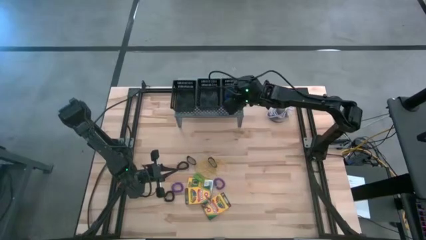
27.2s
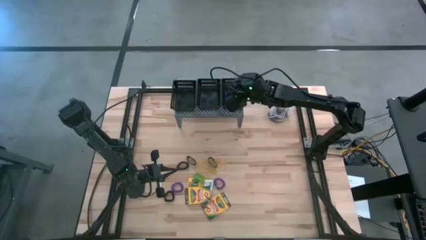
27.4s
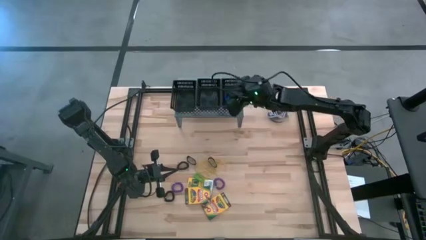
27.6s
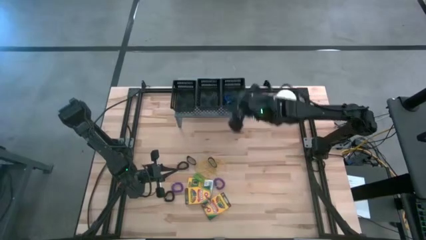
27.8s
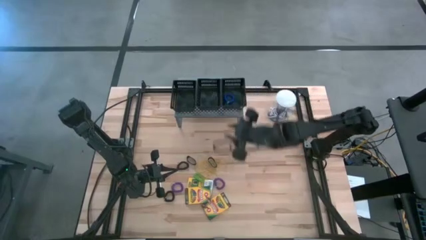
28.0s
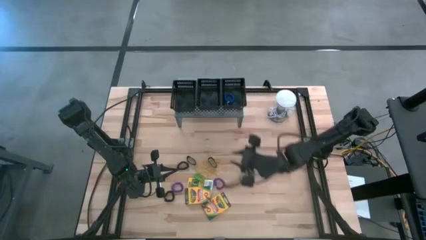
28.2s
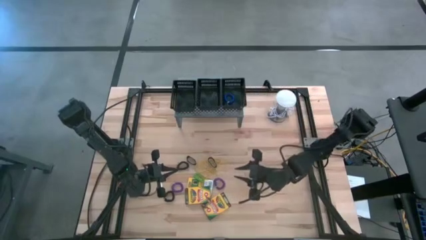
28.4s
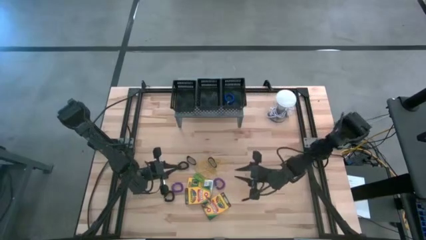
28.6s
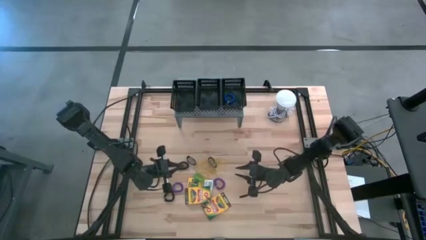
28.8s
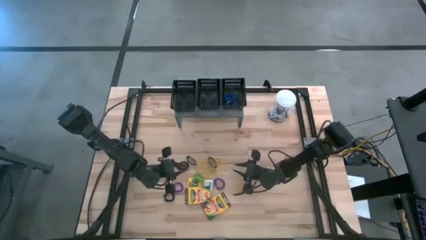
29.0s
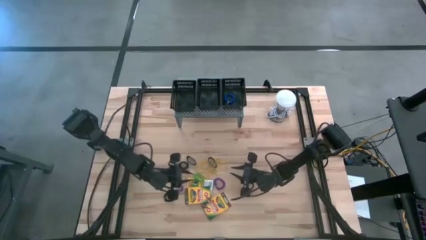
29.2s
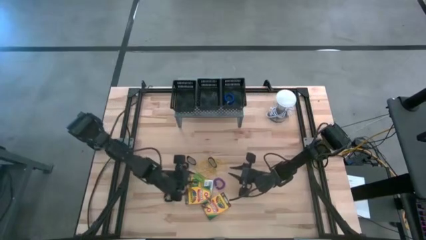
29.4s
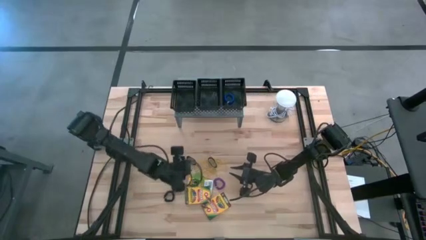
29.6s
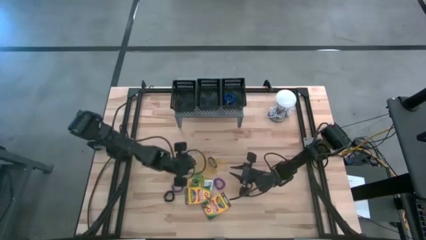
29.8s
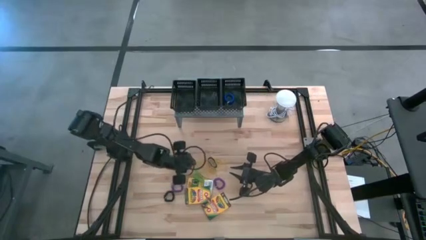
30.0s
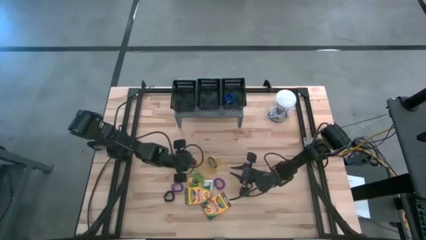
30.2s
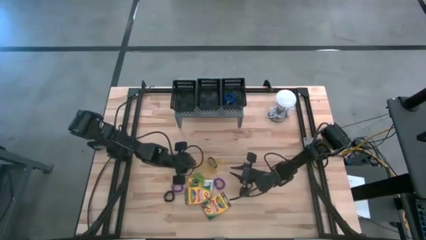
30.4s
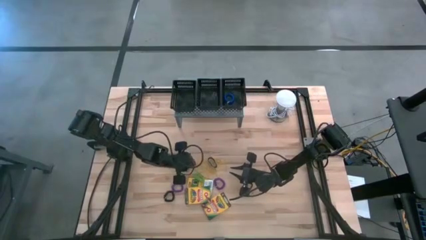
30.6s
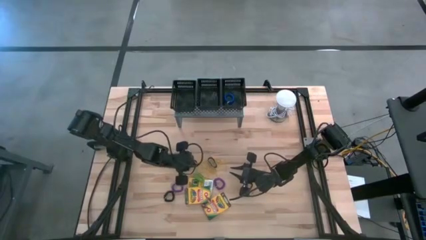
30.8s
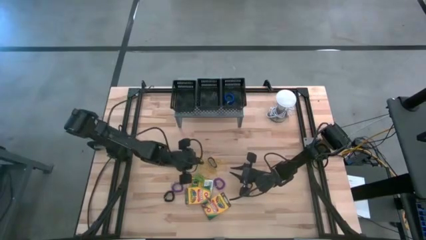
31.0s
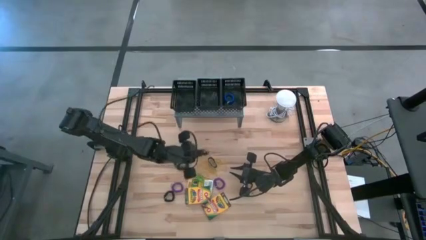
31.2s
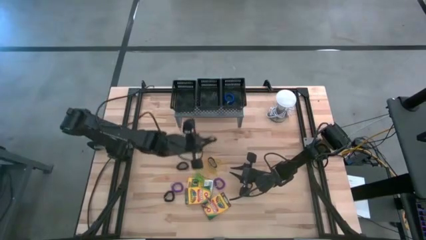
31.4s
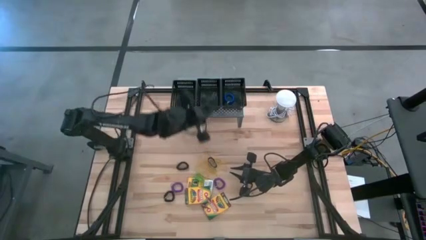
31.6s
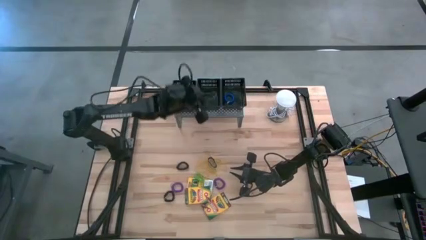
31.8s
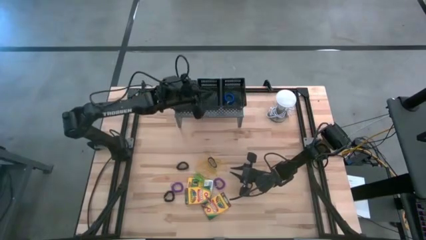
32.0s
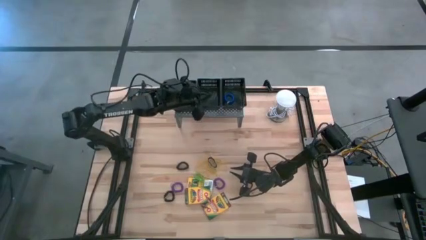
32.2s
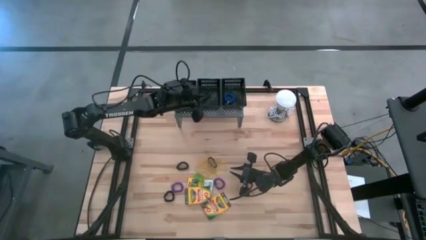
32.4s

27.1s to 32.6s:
Task: Pick & Place Office Desk Supplies
Put the black rubber band in the middle black bin on the shelf

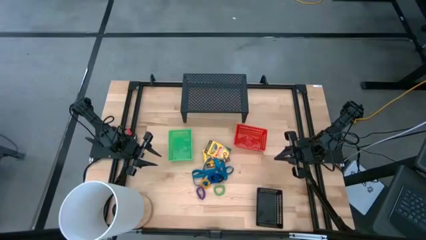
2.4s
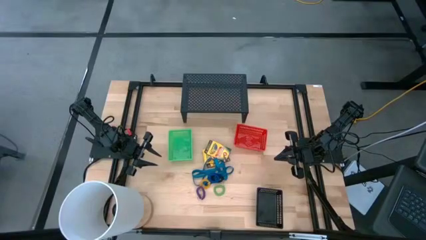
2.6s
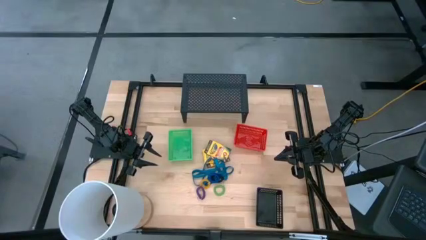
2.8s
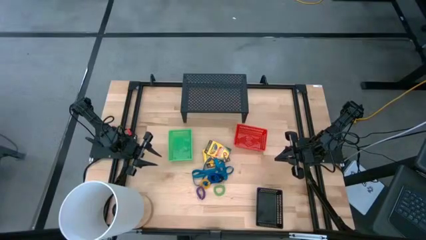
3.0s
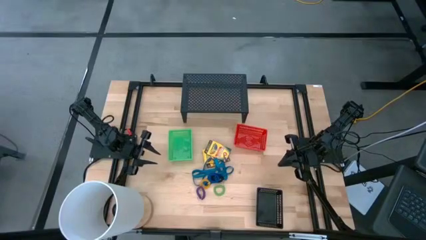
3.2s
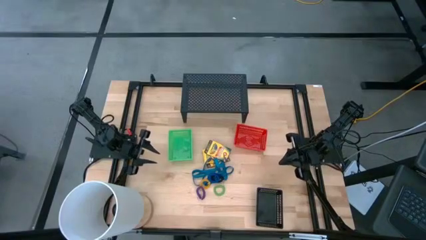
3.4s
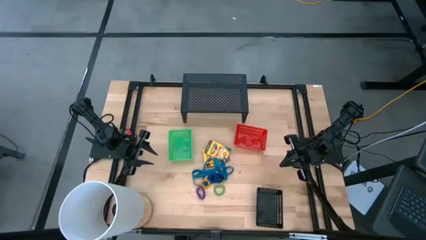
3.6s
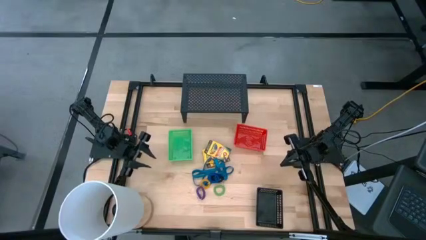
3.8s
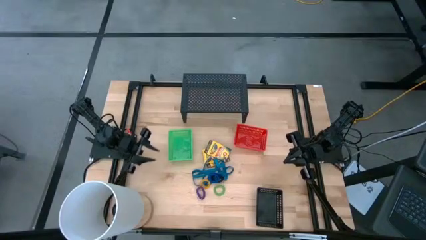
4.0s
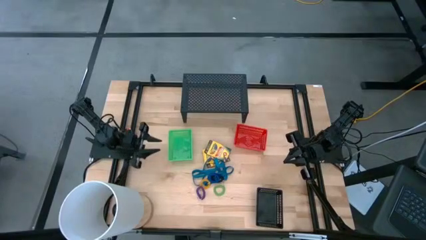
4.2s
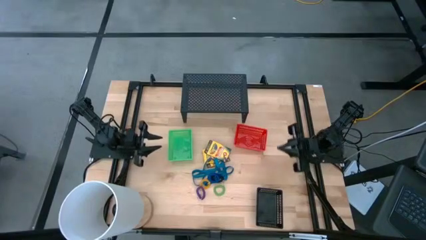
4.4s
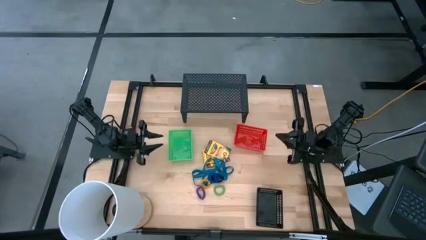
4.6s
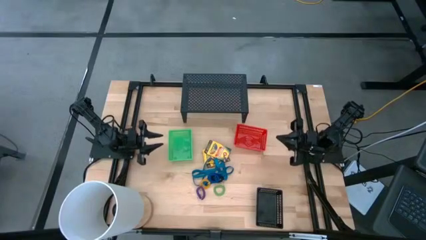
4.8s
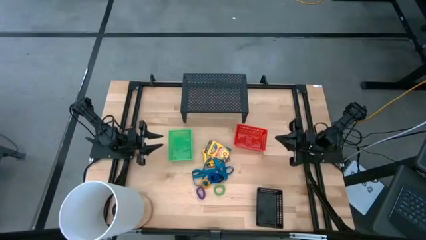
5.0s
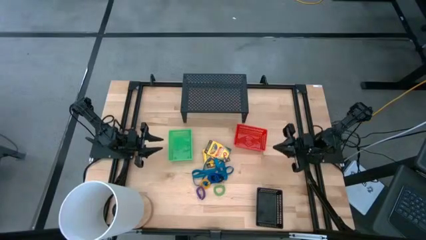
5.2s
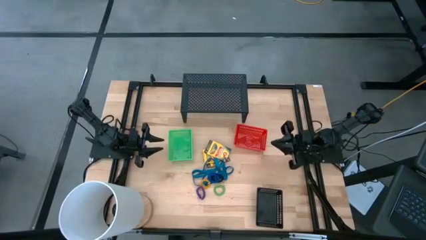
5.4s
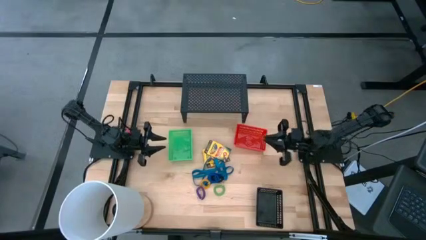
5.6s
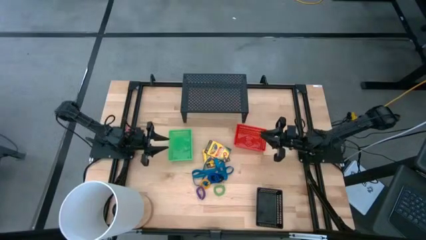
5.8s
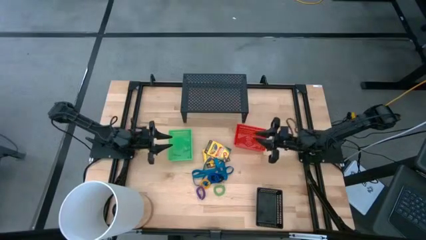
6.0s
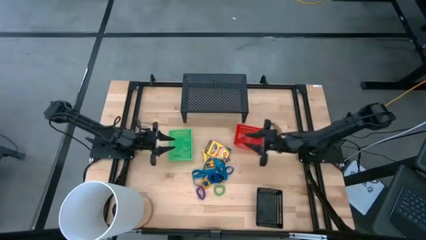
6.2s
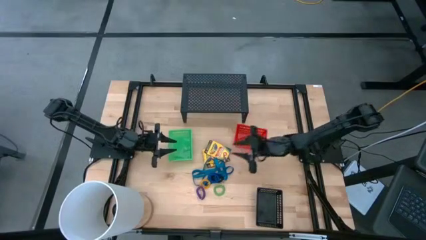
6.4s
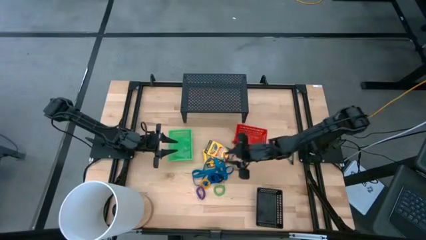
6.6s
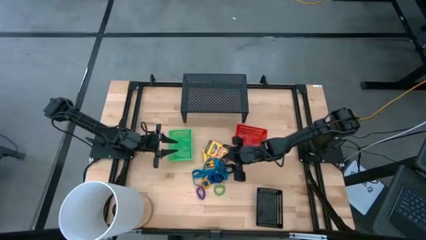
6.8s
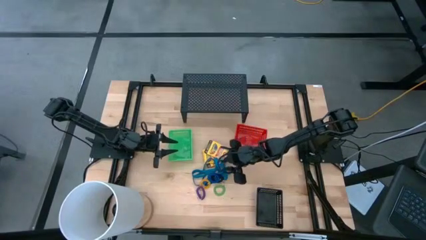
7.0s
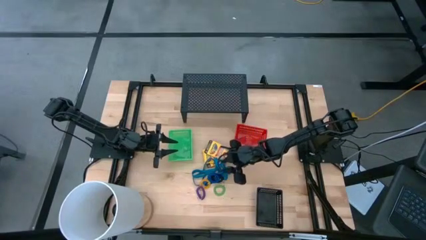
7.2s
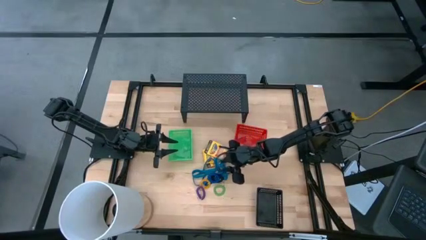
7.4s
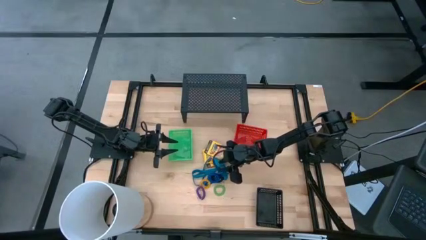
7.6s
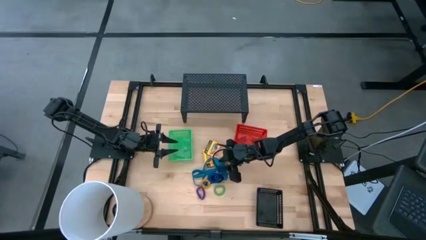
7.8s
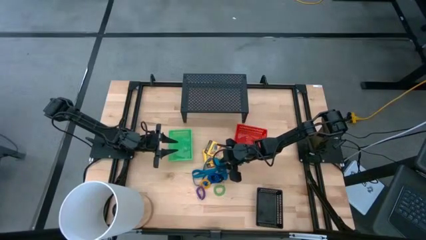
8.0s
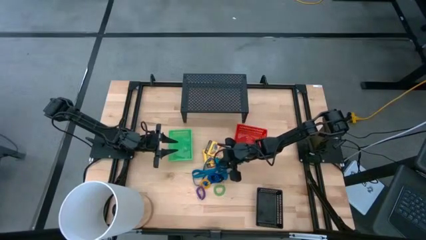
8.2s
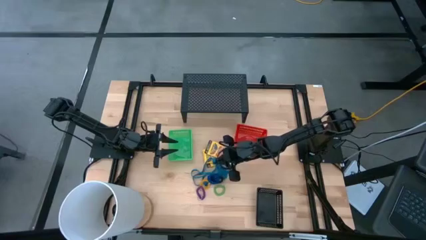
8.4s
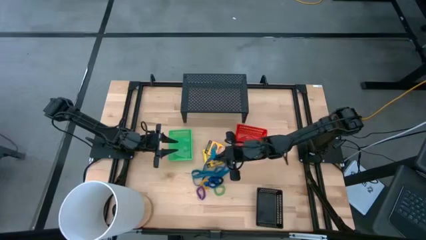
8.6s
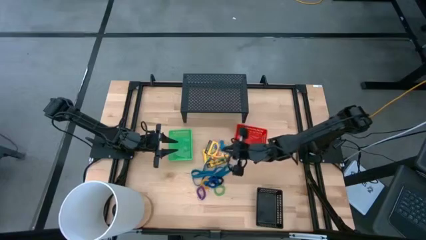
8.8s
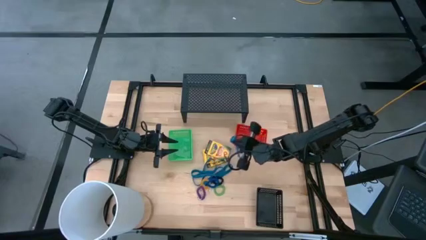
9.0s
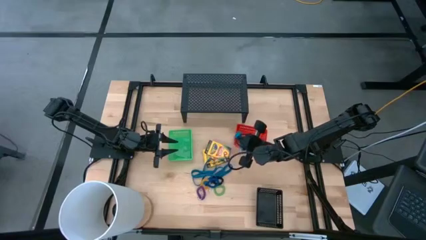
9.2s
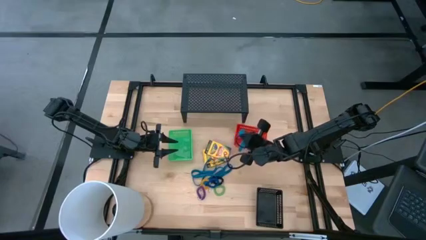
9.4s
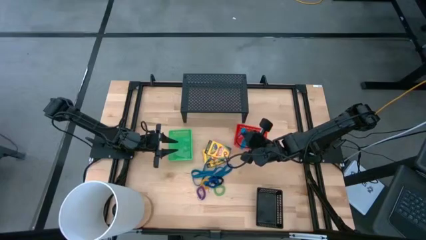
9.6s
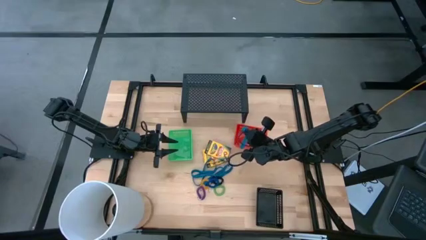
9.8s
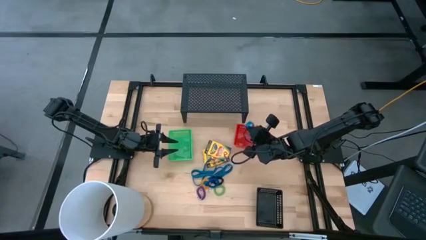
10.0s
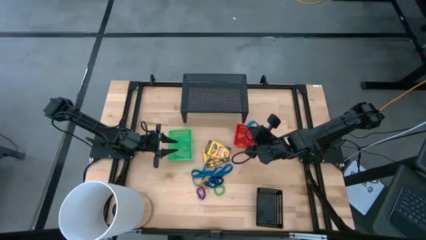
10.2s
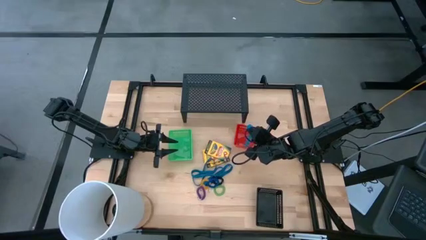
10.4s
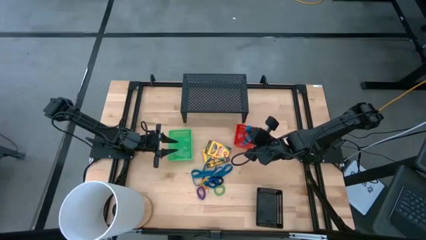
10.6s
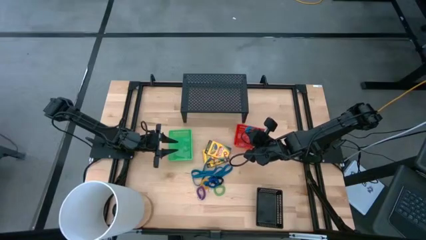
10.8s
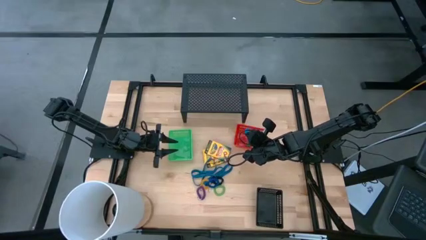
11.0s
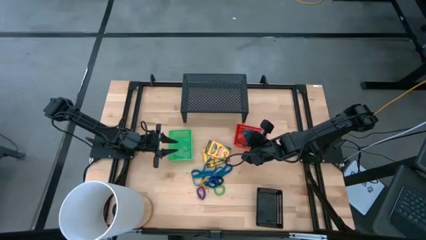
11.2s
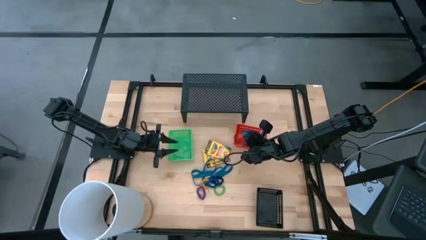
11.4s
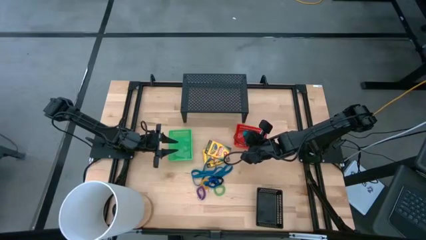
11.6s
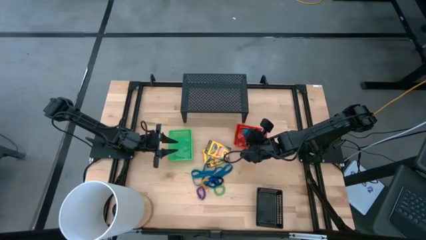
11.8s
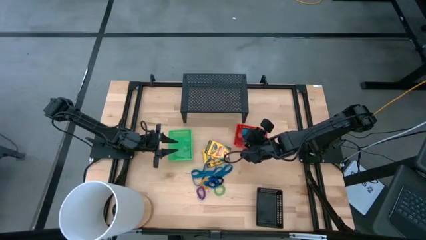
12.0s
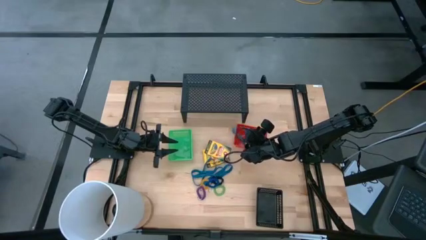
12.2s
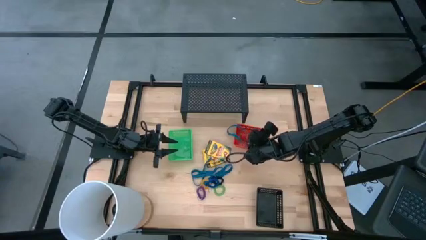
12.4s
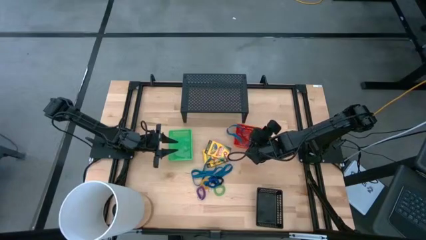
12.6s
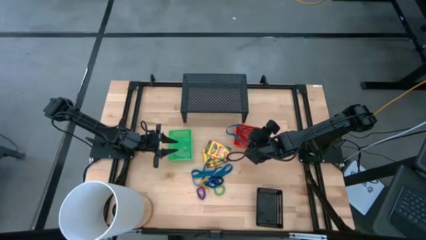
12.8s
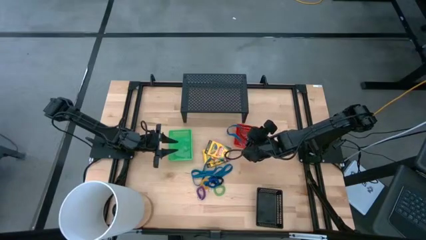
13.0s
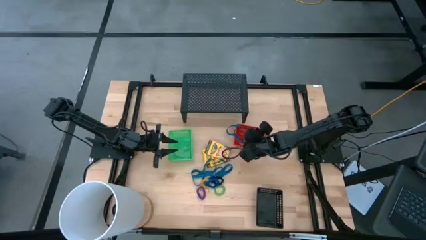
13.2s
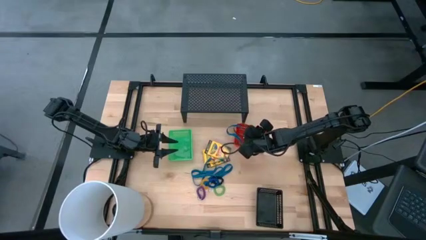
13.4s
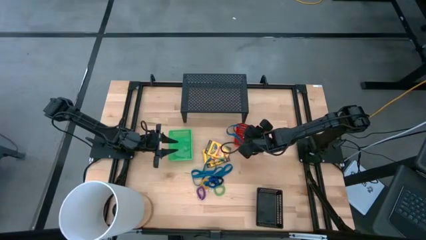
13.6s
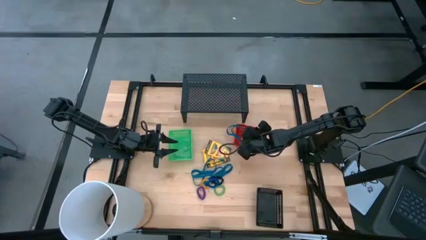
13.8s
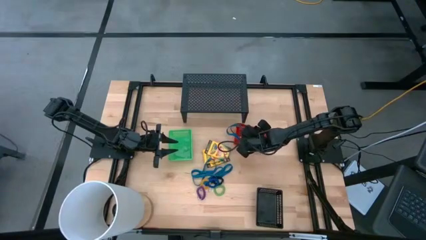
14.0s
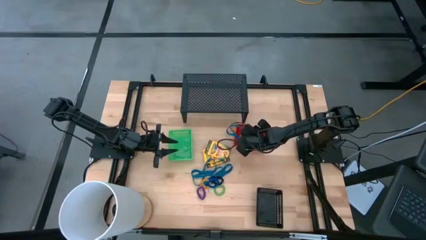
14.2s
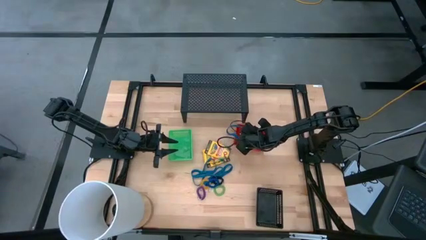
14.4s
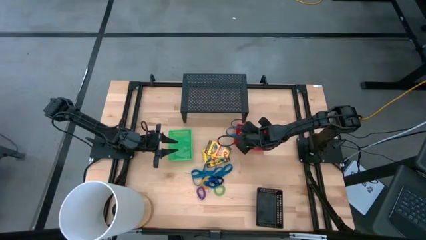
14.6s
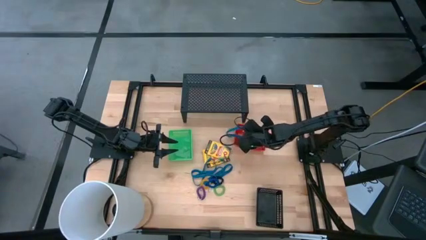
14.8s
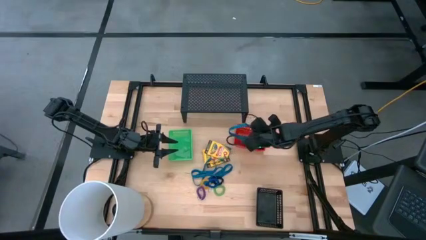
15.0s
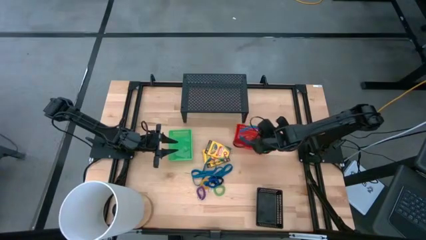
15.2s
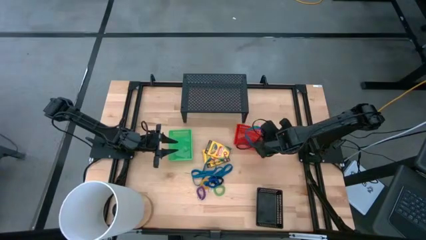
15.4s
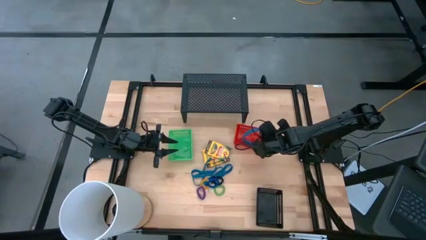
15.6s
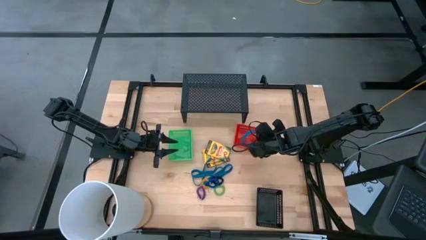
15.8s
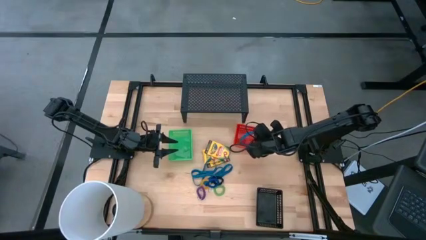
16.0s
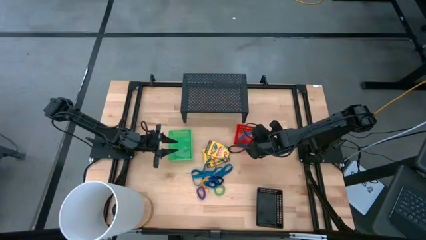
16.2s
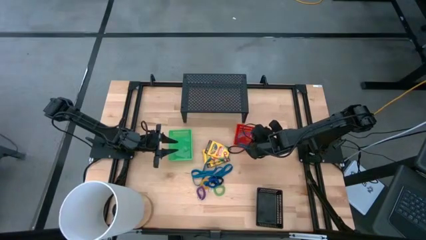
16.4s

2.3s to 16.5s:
Task: Pick & Place Office Desk Supplies
Put the blue rubber band into the red bin
